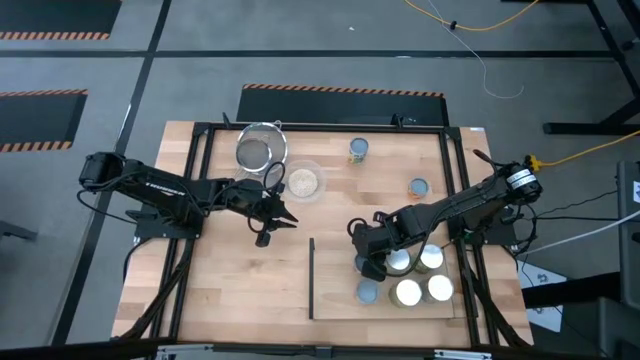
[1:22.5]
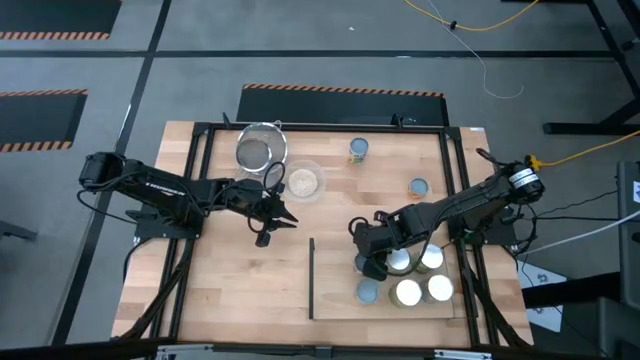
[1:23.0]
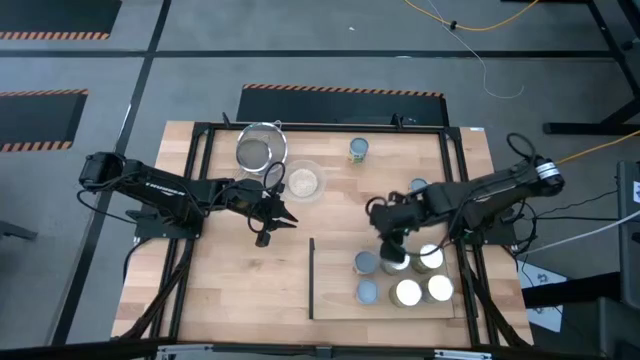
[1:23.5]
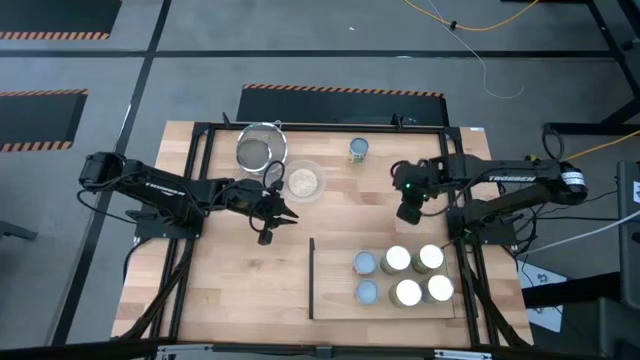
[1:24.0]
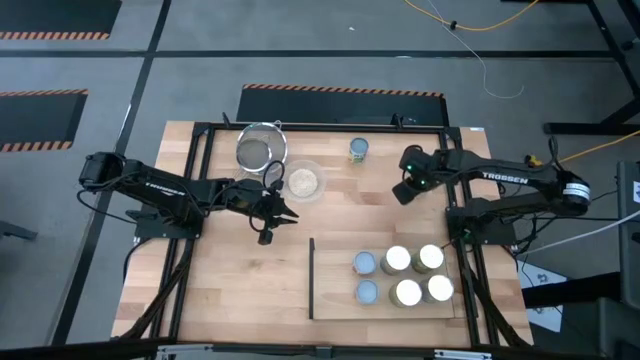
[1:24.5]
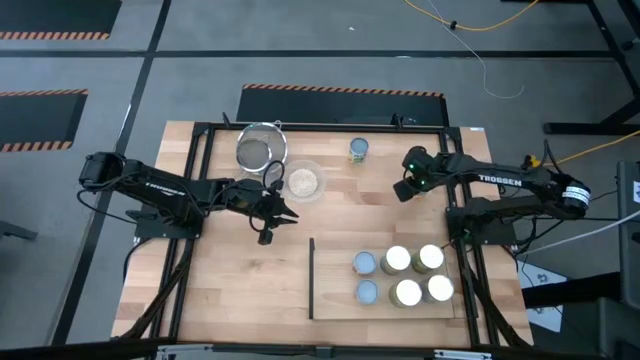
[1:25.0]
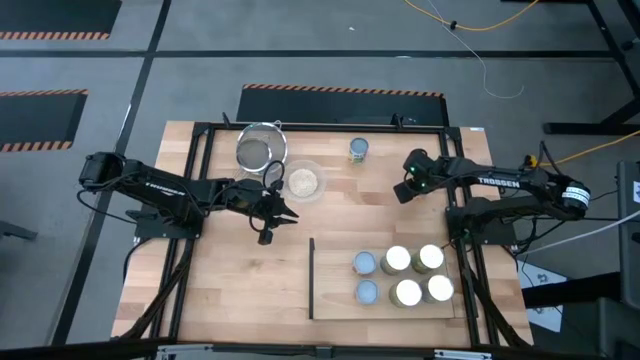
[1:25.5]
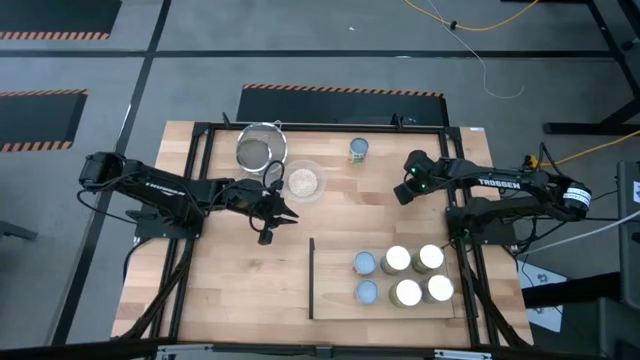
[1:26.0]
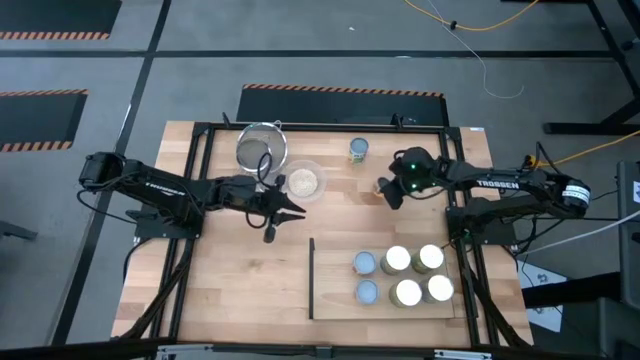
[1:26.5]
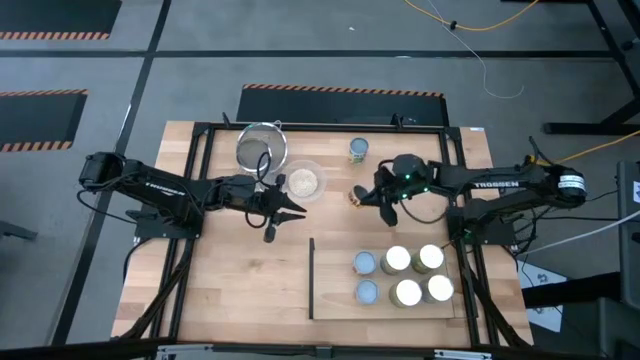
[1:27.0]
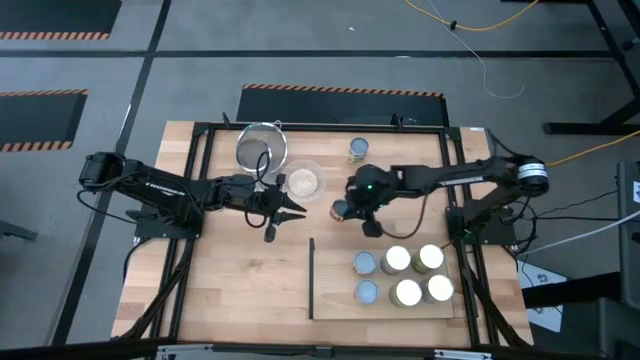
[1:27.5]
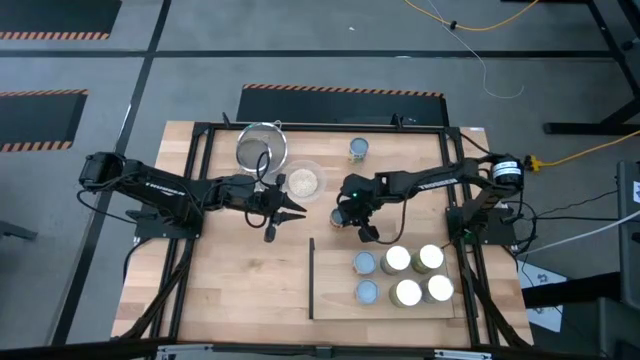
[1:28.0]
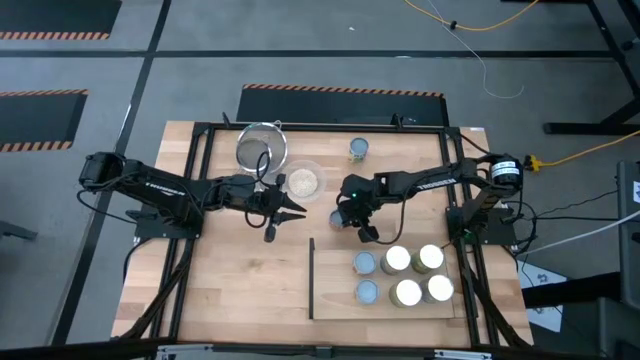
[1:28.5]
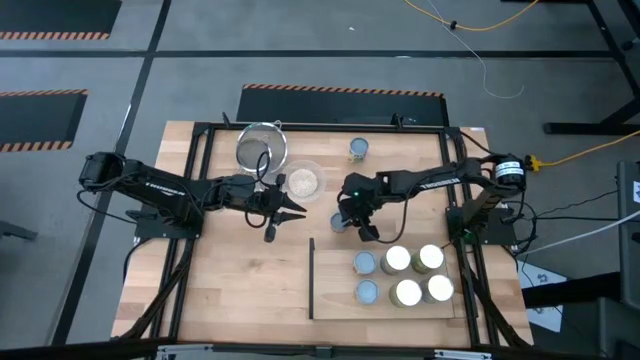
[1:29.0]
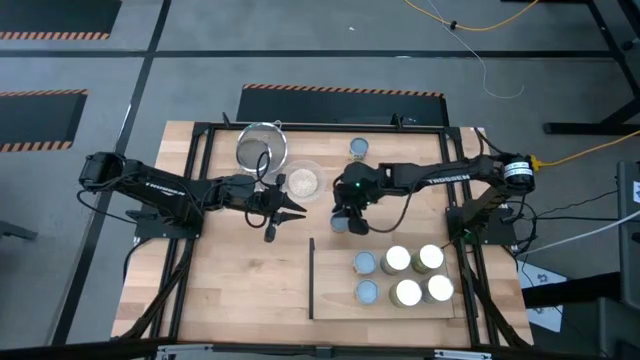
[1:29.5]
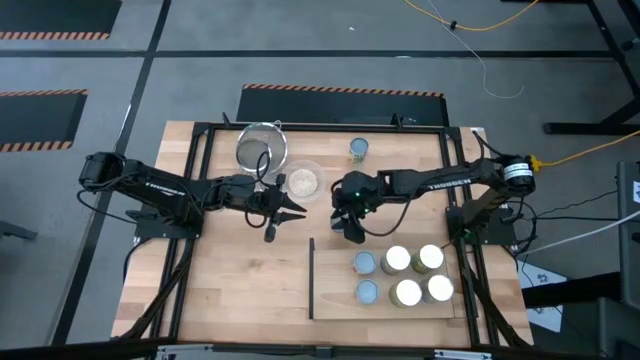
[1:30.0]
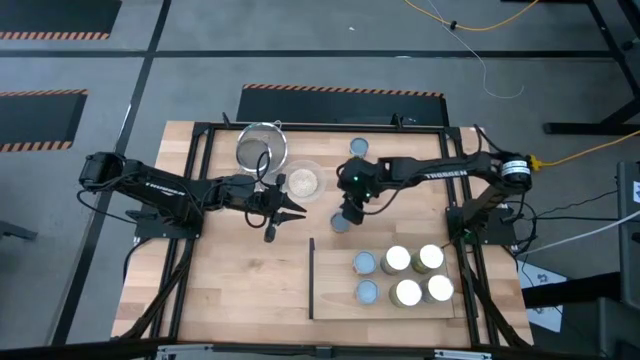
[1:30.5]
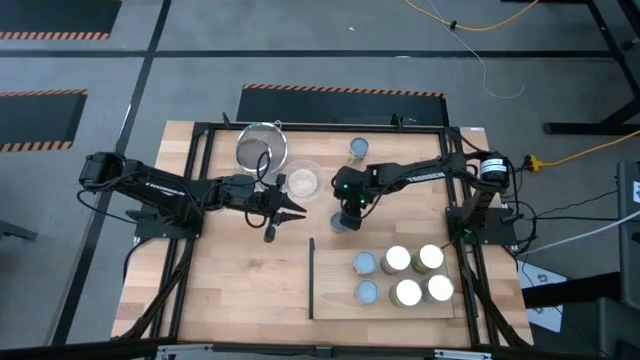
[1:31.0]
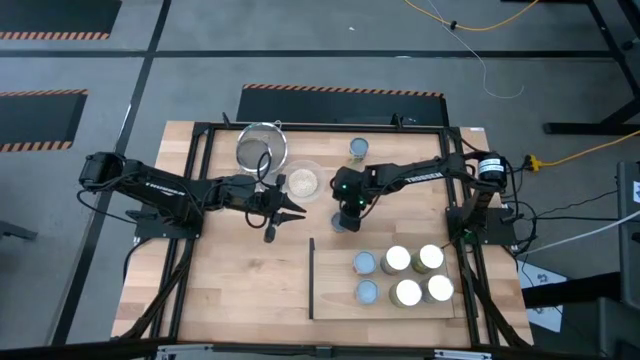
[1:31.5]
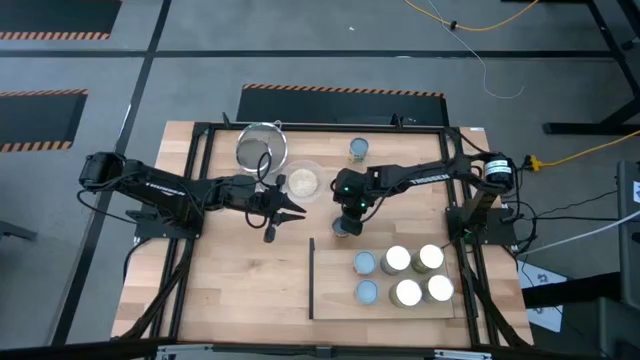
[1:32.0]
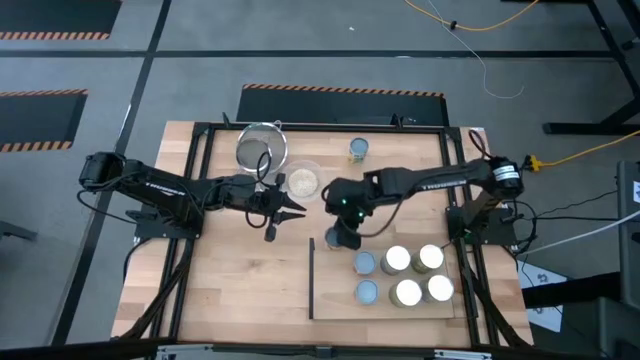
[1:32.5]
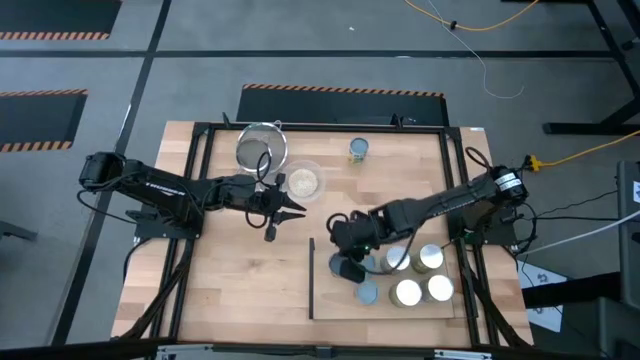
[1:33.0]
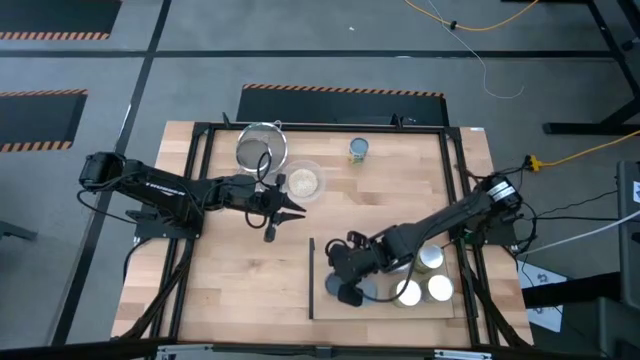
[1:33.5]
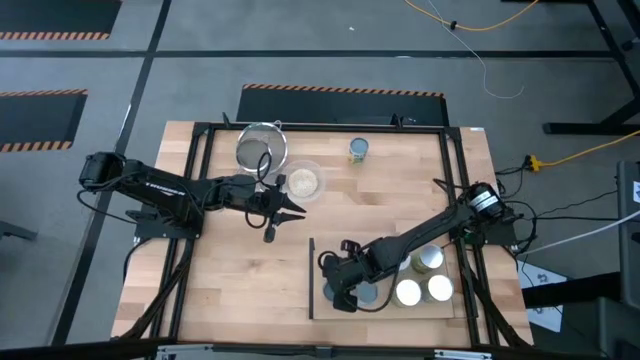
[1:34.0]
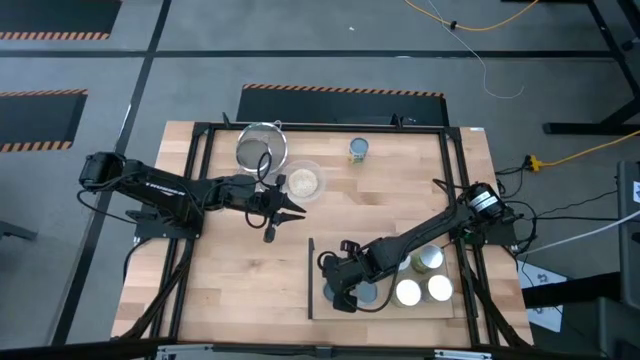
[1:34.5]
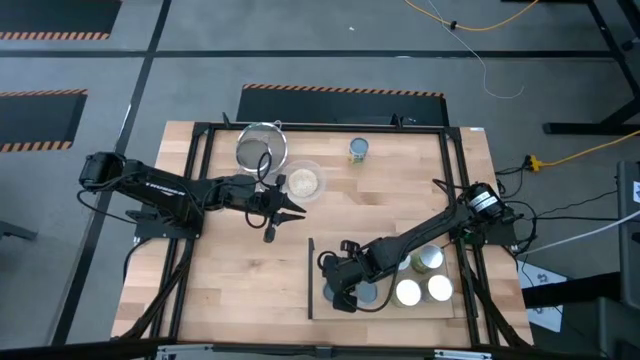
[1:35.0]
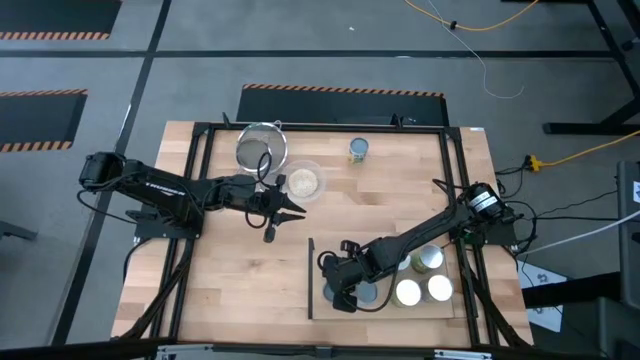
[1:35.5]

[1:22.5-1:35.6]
Task: Pick and place cans onto a shelf
Put the yellow can on the shelf

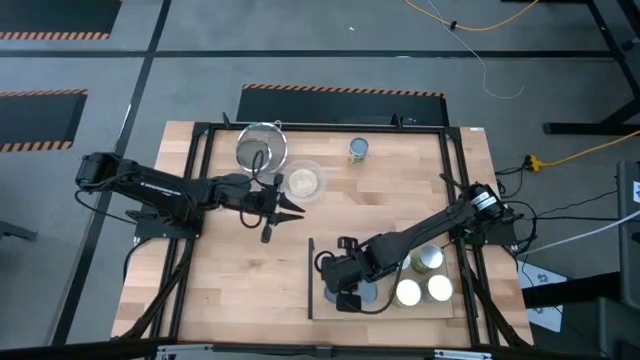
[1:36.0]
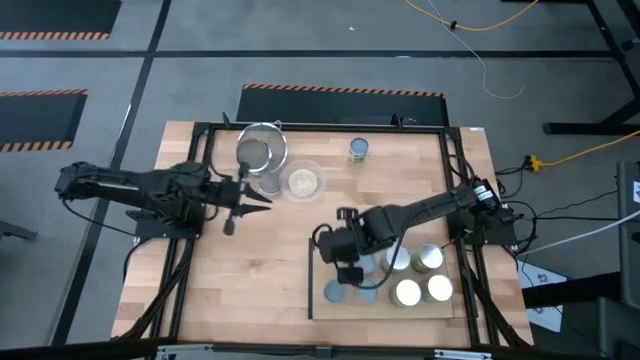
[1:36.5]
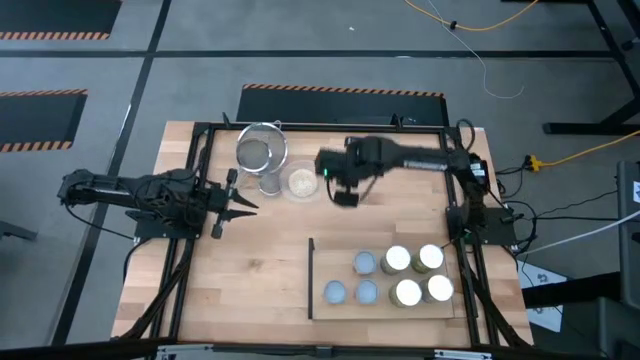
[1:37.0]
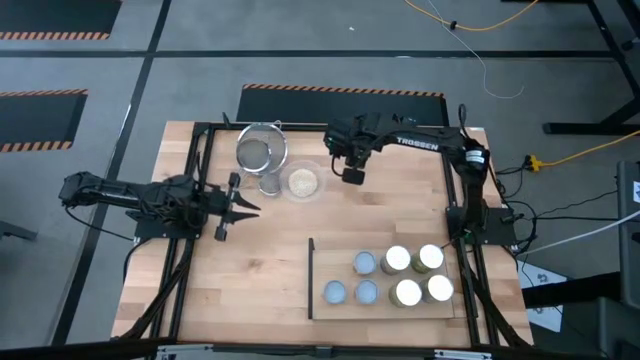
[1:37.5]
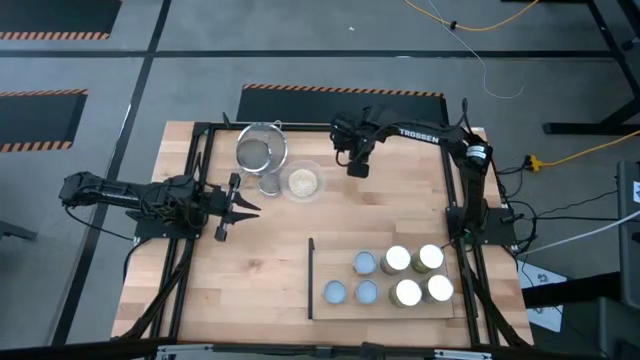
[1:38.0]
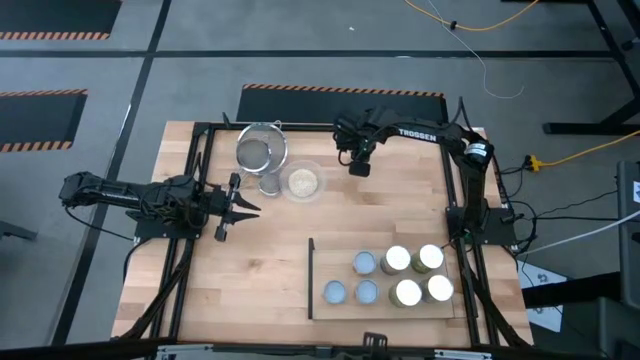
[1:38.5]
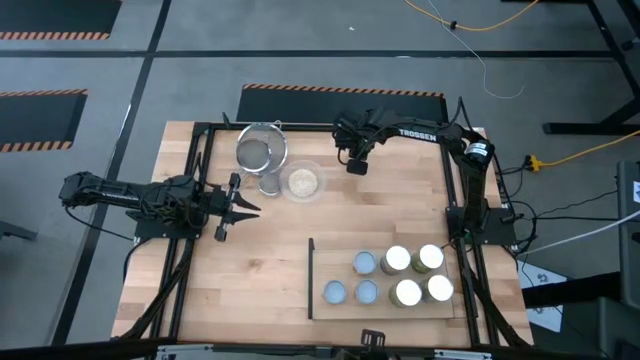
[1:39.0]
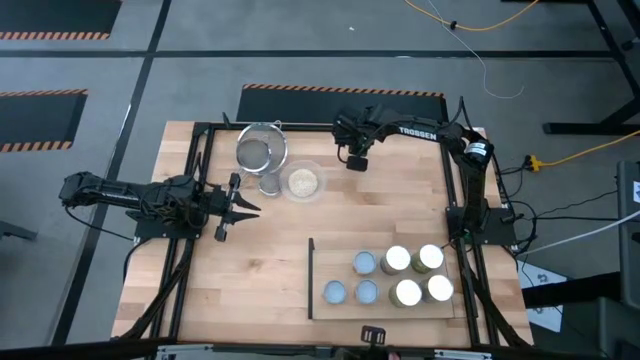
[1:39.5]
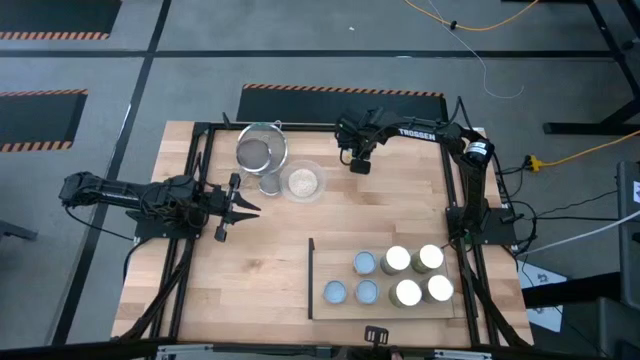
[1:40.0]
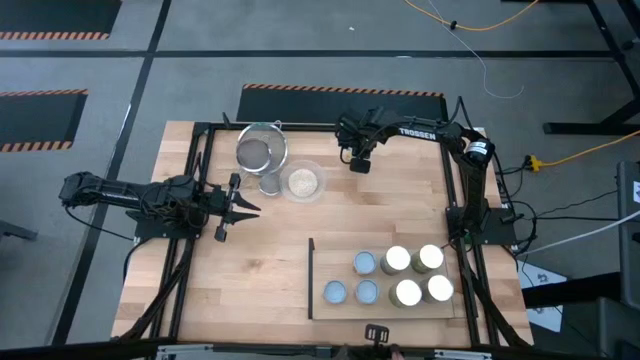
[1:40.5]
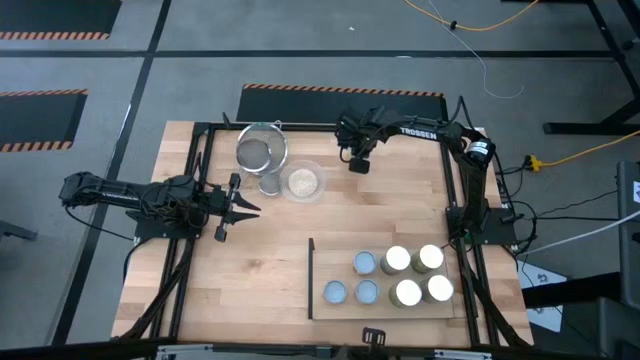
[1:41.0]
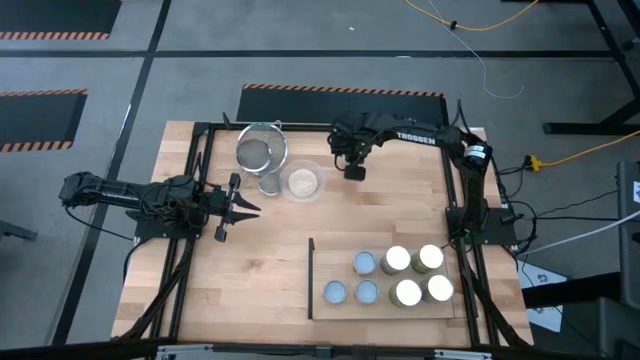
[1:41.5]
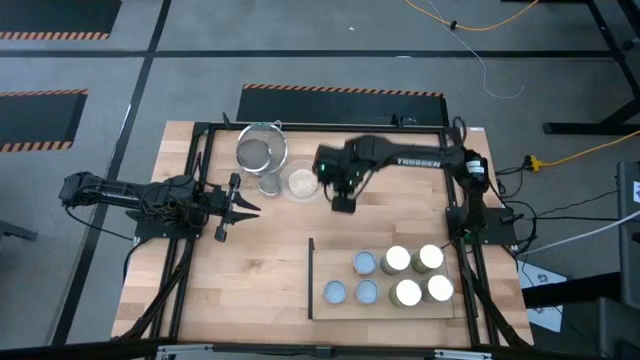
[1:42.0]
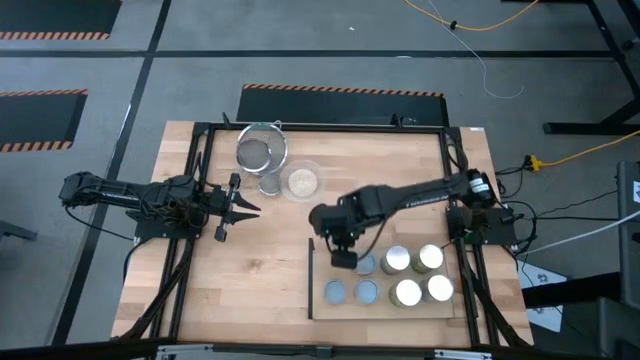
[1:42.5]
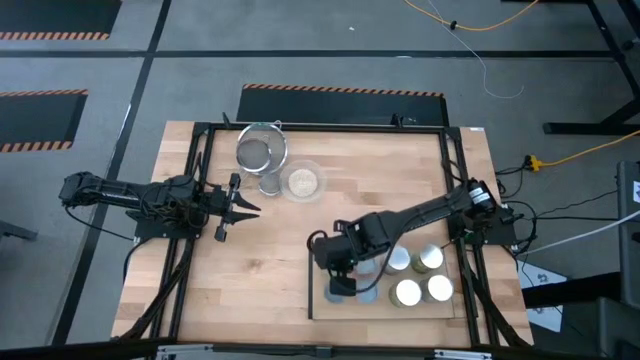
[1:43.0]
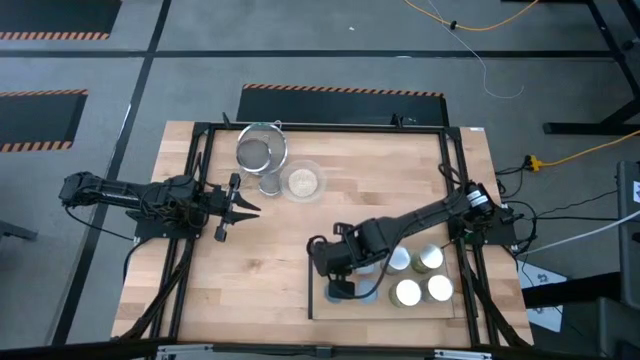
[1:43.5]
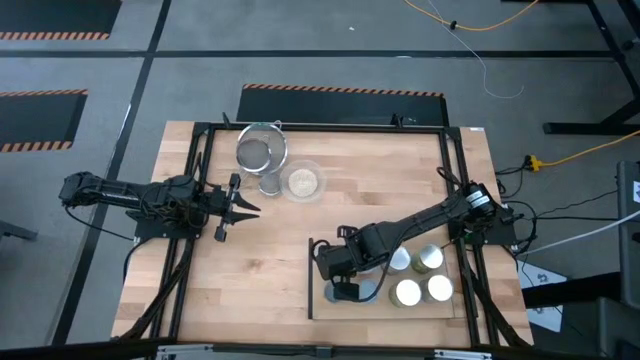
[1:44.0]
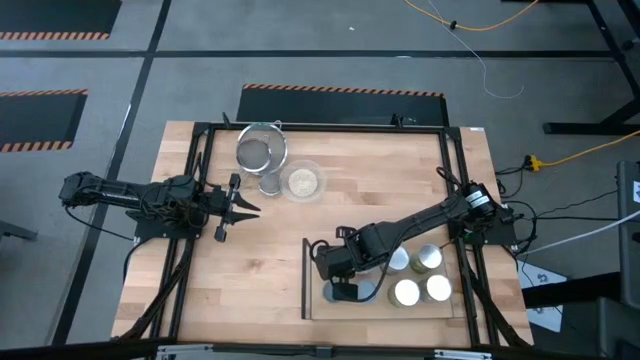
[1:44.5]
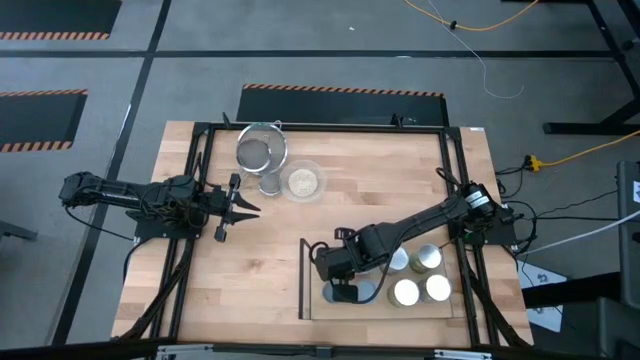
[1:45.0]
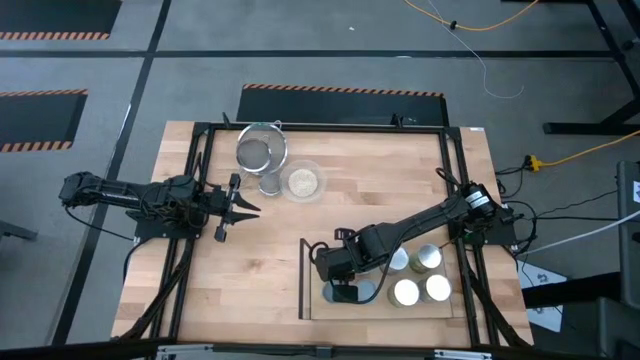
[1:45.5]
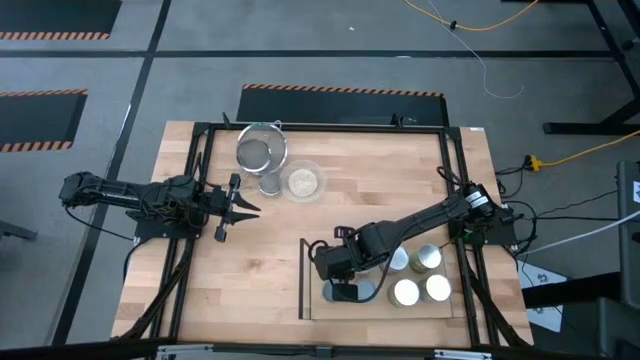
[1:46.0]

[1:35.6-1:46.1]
Put the white can on the shelf aligned with the other yellow can
